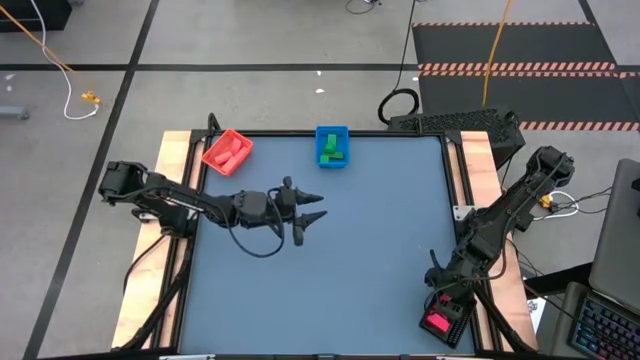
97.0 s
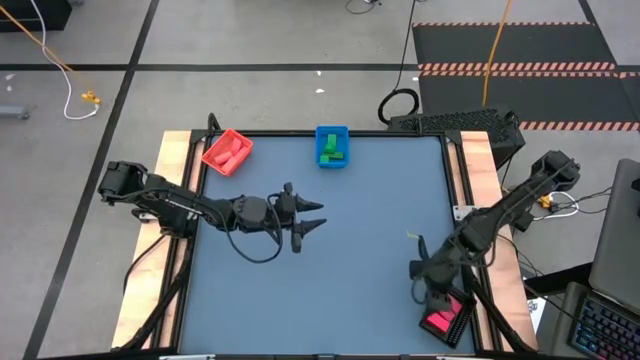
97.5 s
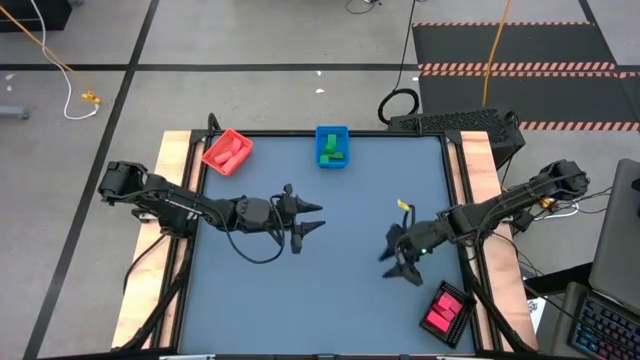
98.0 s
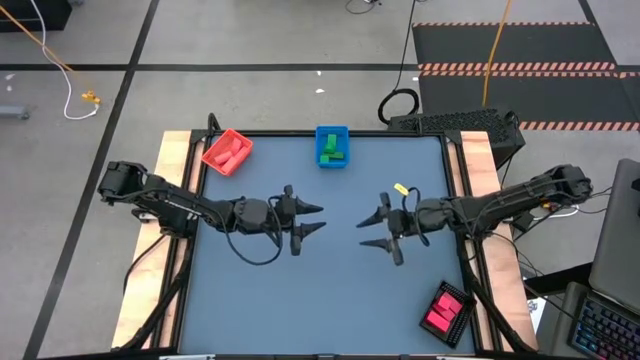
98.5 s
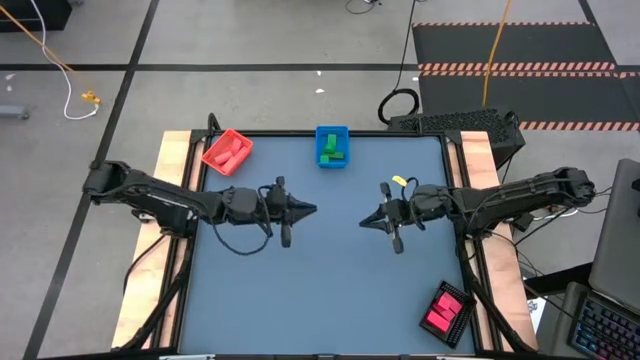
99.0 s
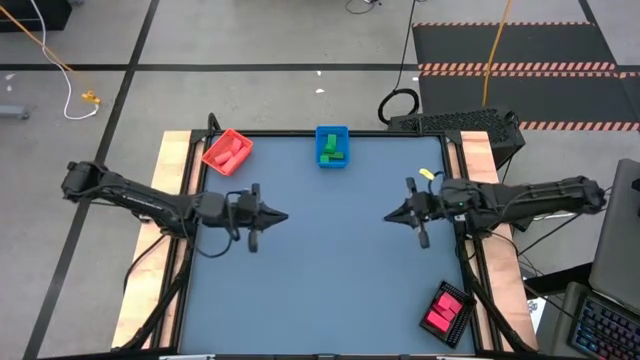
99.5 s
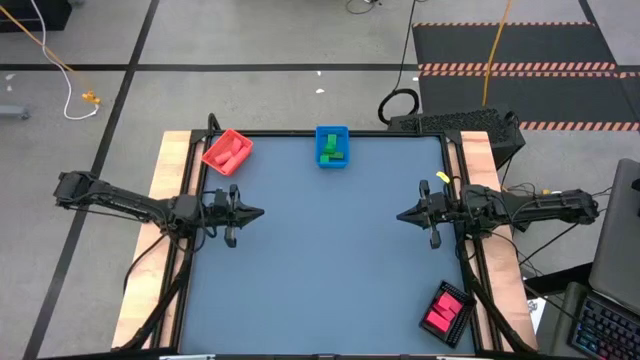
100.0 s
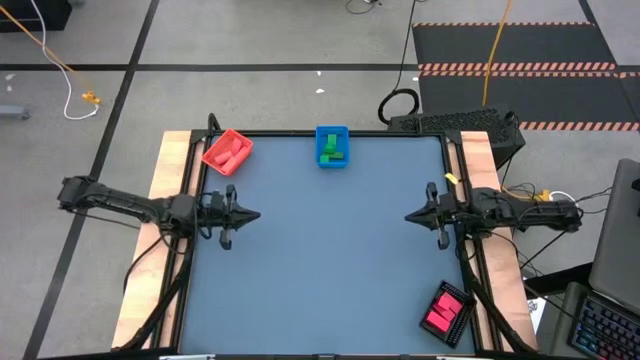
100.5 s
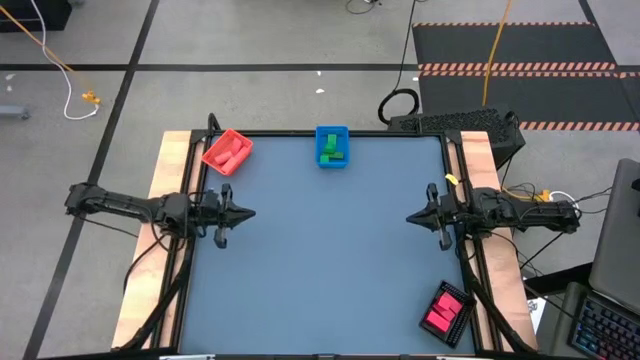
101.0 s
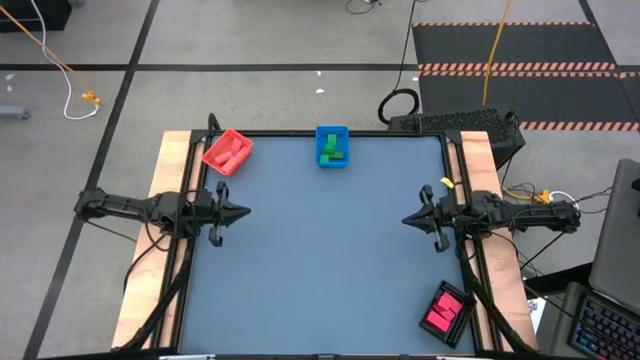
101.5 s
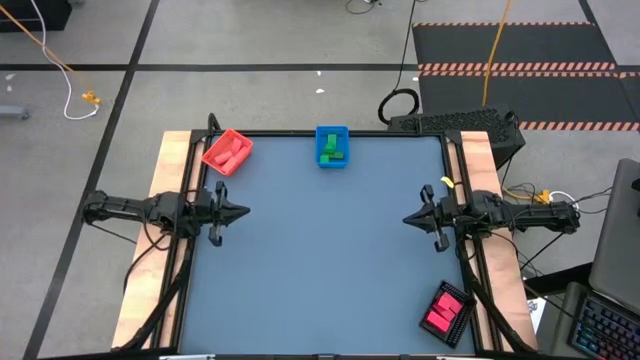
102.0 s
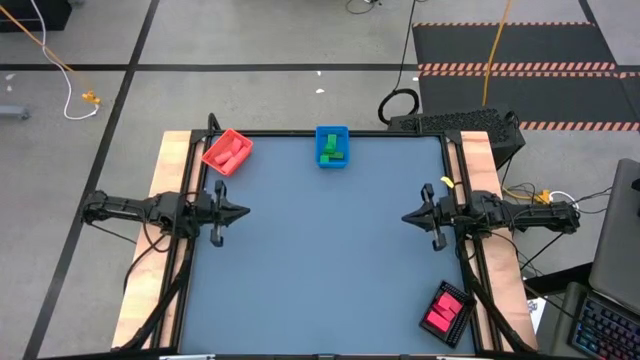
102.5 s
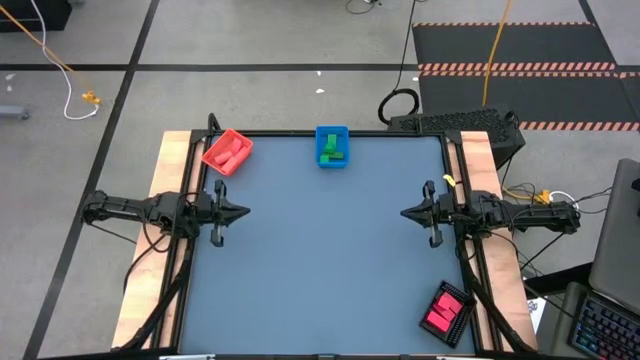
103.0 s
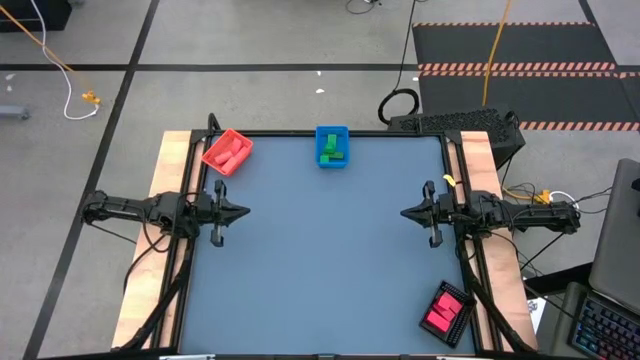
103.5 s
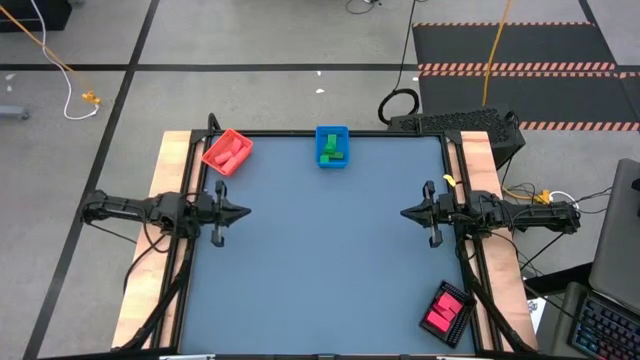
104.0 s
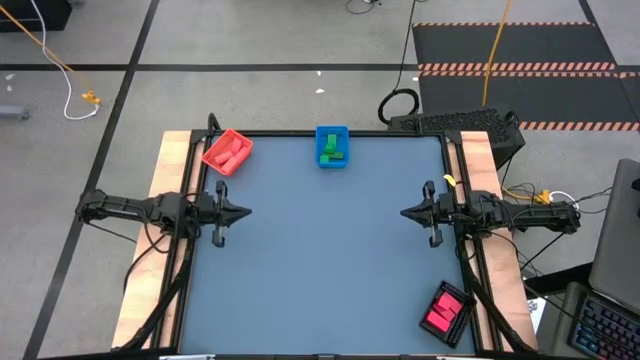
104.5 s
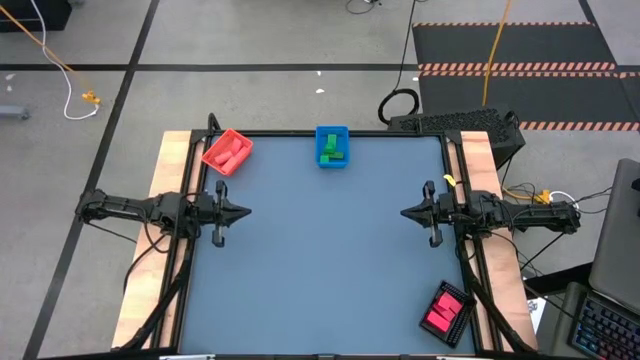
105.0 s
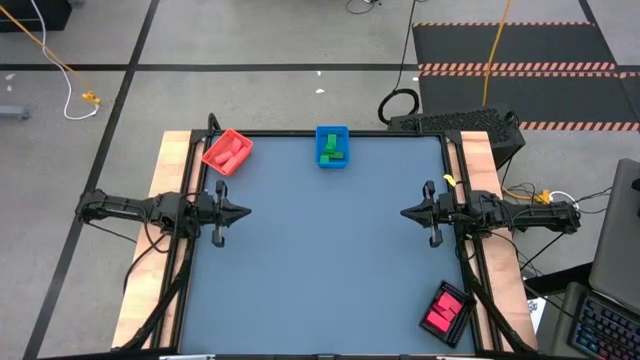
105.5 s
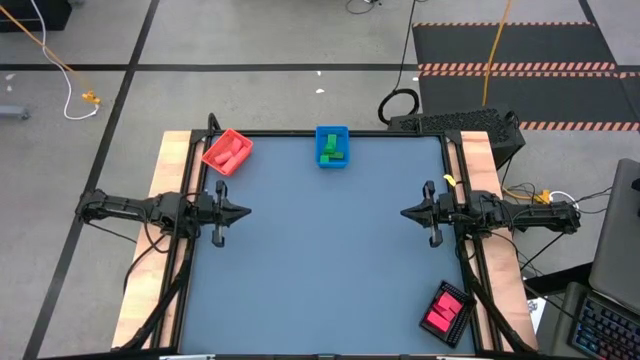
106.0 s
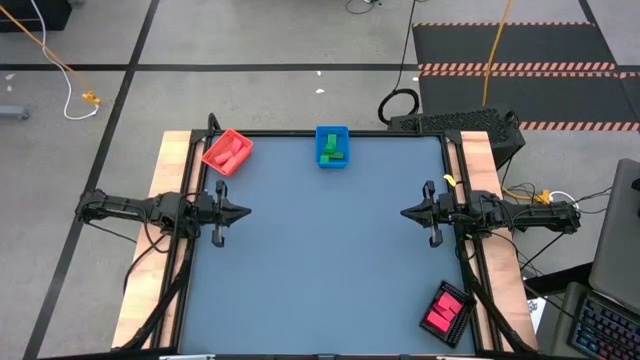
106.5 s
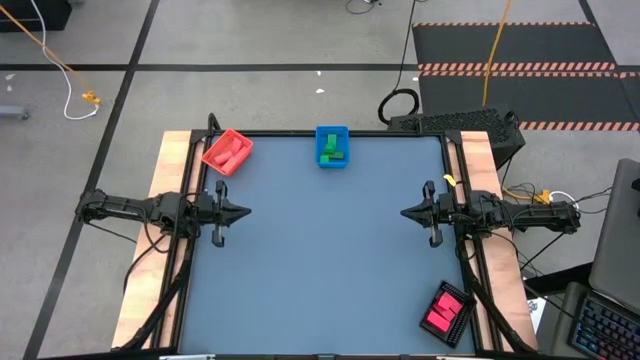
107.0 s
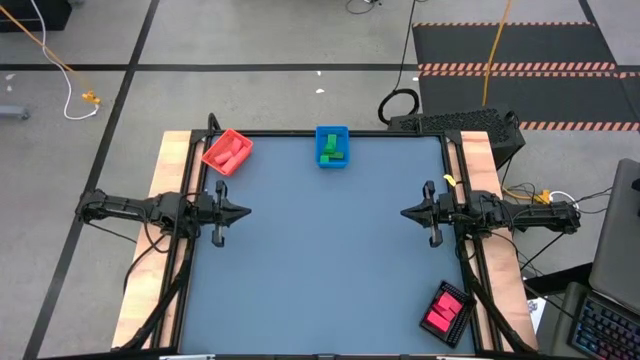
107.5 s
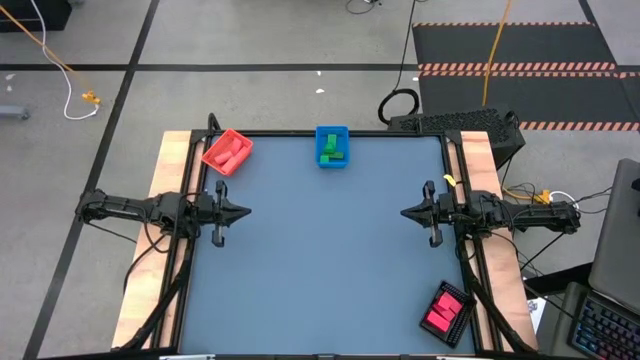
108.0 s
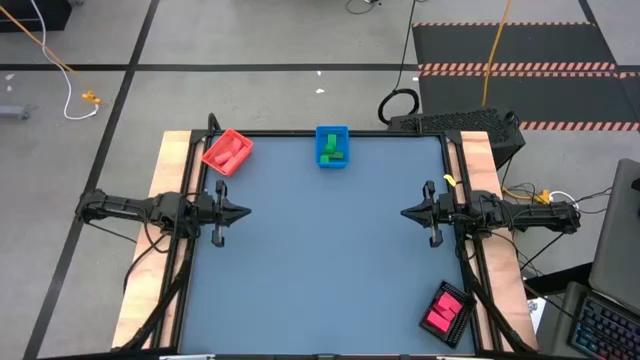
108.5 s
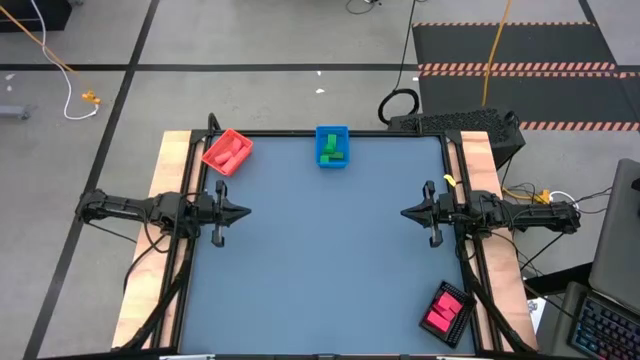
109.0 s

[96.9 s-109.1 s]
Task: Sort & place blocks by color
Return to Home Position

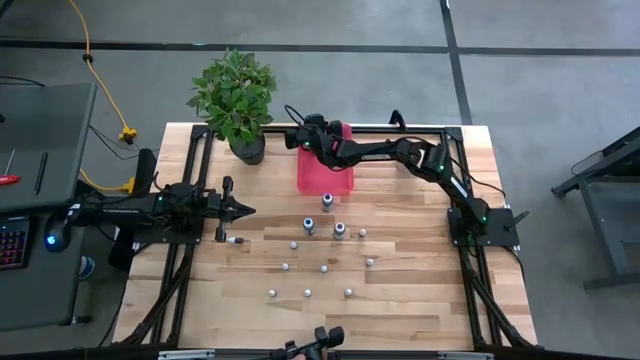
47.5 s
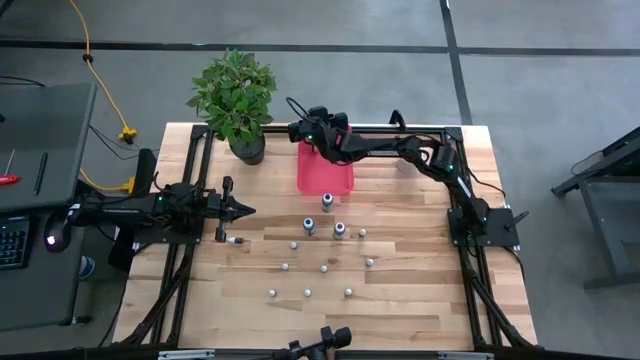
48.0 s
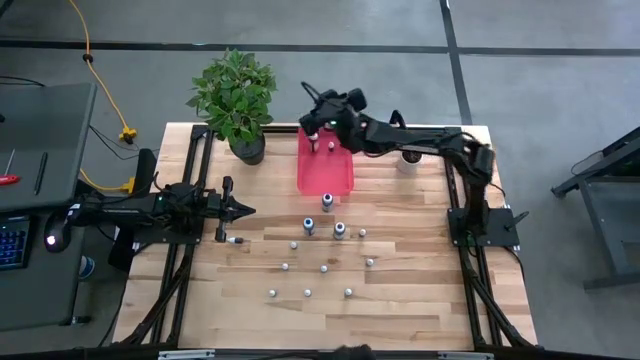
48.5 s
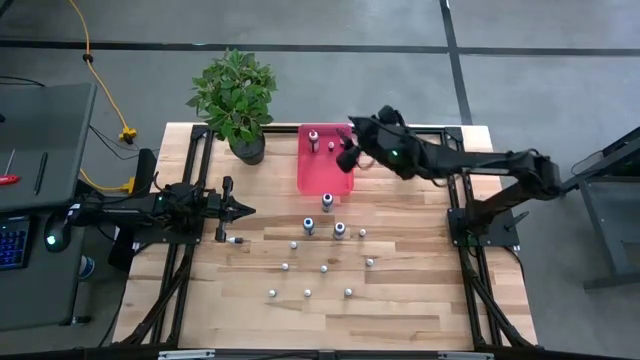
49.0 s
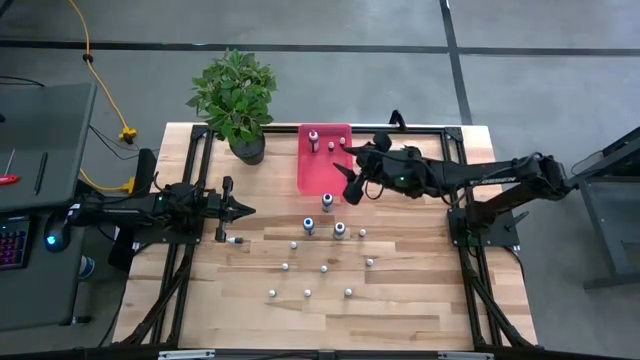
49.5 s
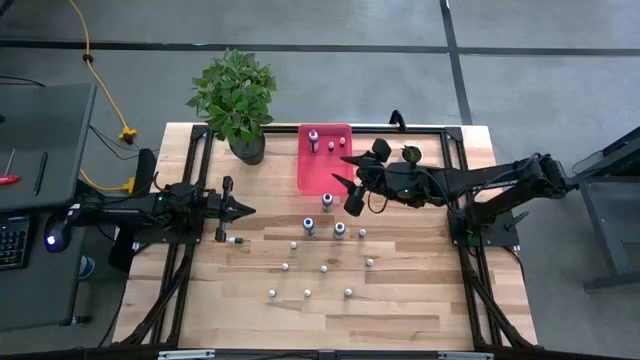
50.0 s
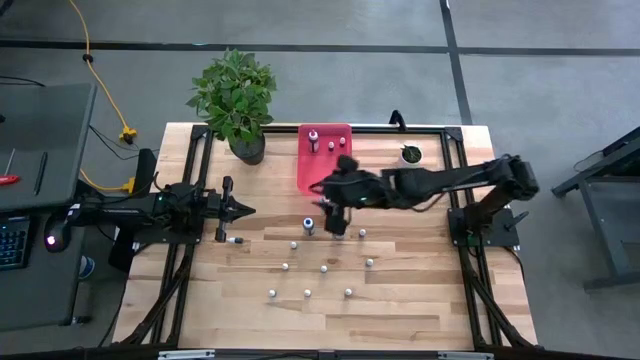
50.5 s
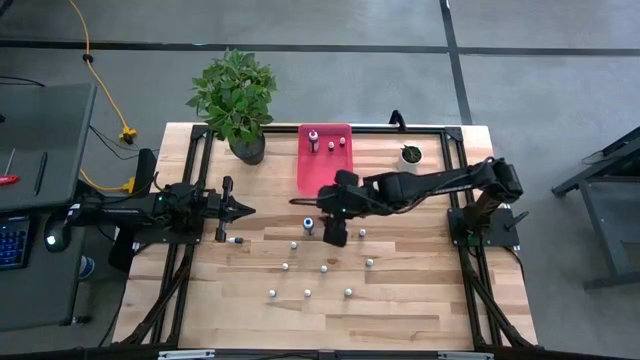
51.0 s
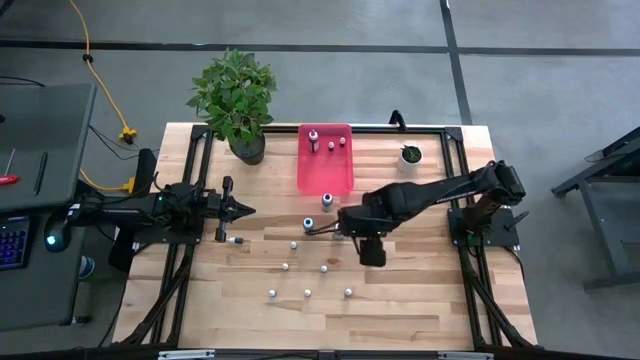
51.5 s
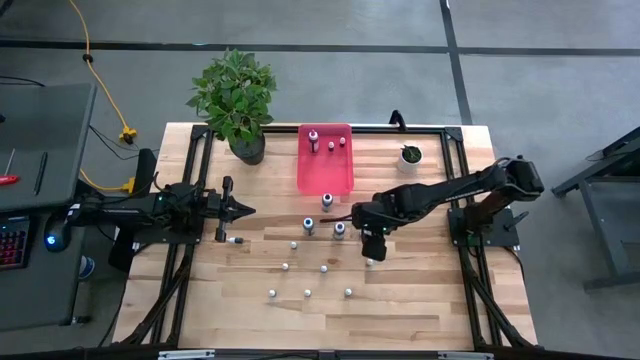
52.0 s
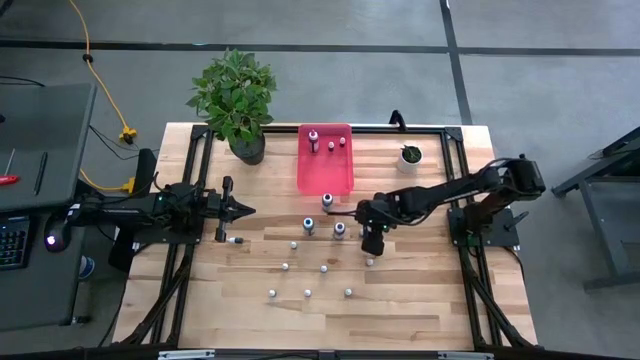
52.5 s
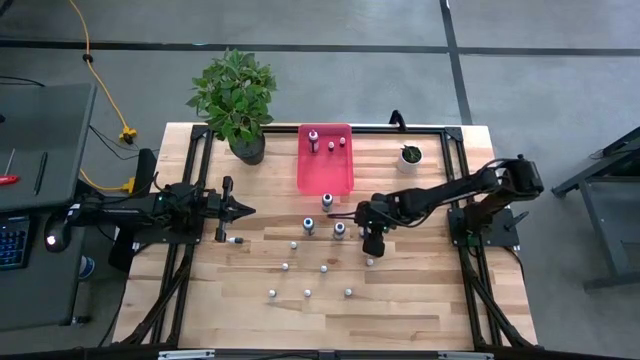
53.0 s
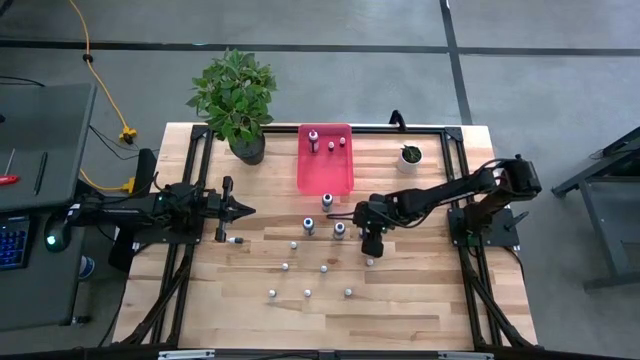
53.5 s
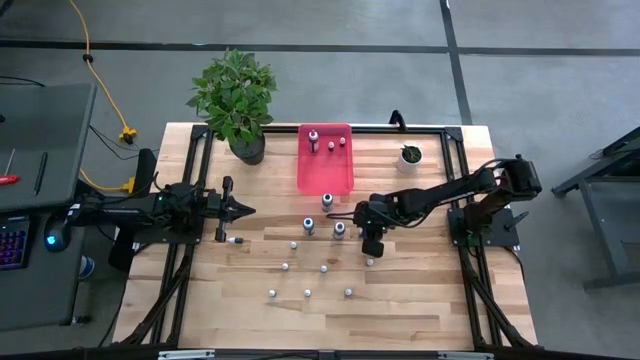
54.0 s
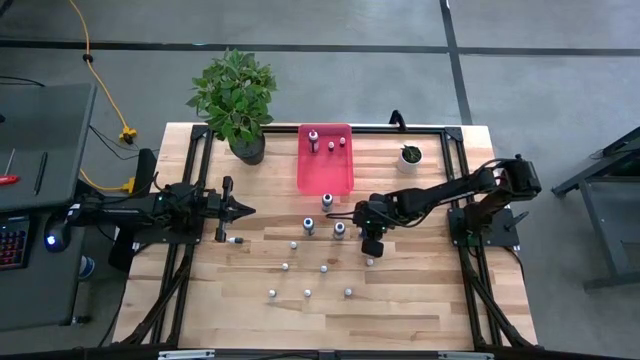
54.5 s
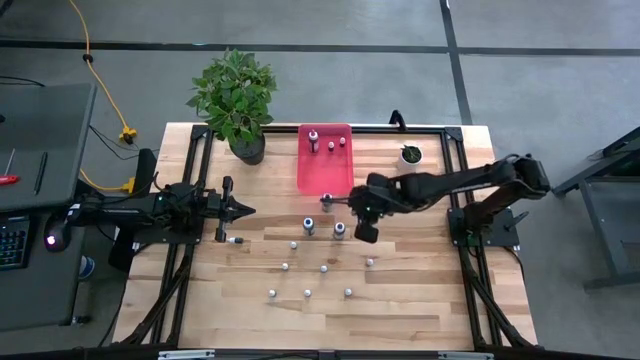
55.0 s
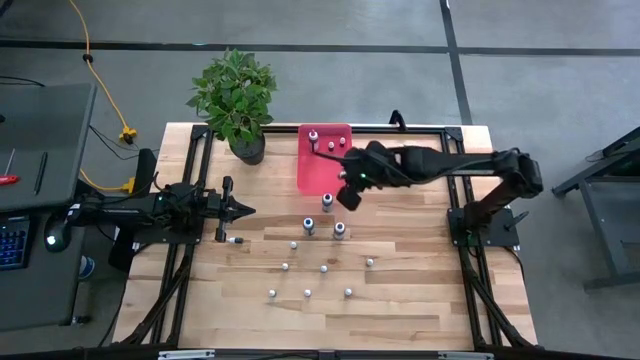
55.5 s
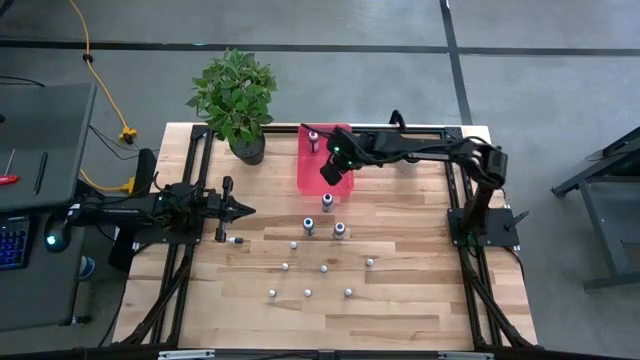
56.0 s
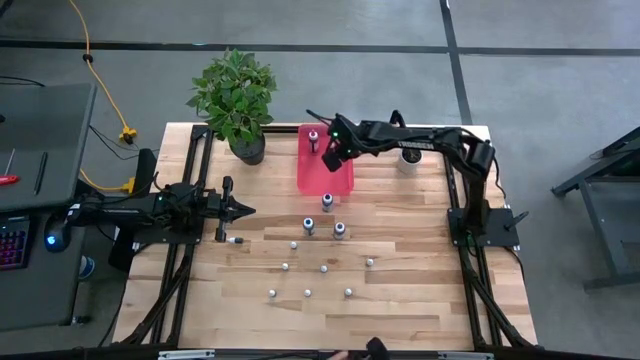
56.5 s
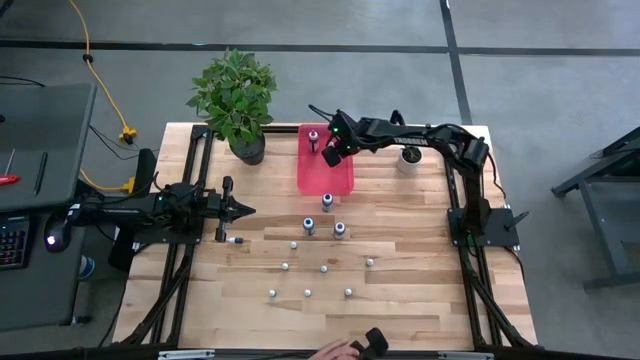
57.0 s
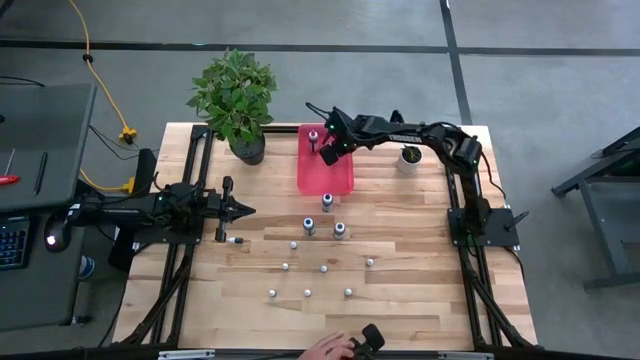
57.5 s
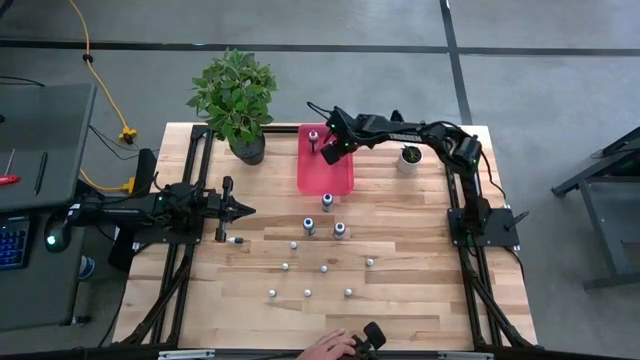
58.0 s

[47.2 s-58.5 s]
Task: Pick & Place food coloring
Put the purple food coloring bottle into the pink bin
